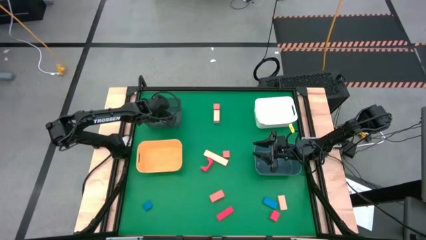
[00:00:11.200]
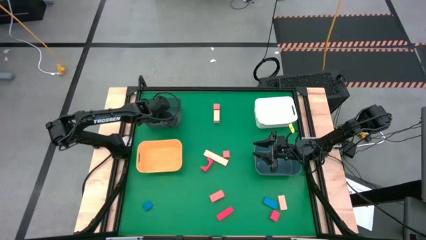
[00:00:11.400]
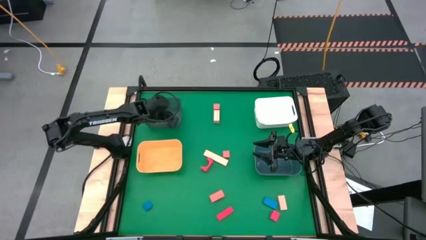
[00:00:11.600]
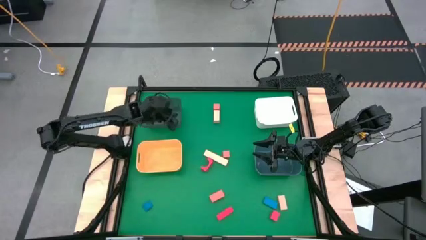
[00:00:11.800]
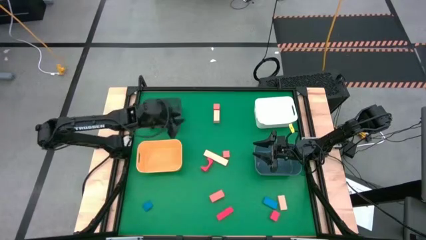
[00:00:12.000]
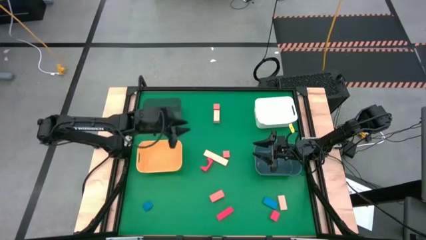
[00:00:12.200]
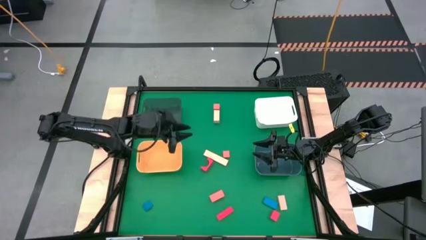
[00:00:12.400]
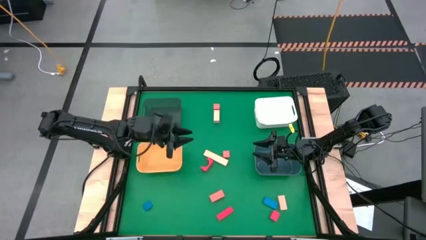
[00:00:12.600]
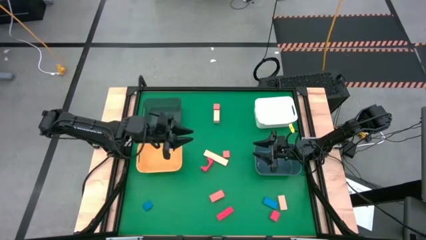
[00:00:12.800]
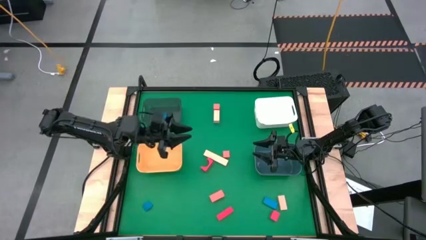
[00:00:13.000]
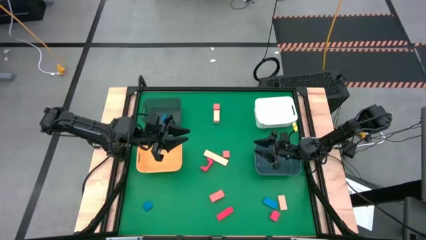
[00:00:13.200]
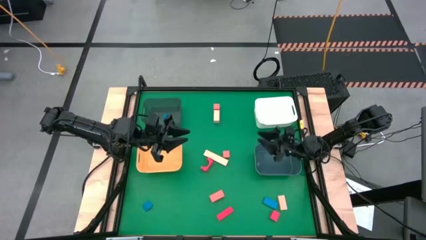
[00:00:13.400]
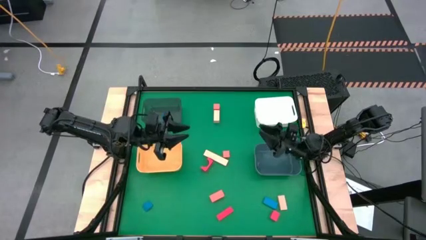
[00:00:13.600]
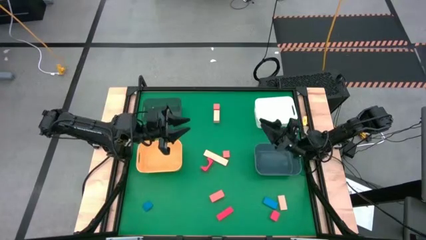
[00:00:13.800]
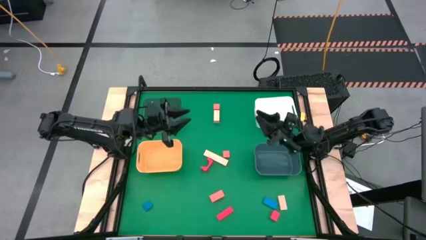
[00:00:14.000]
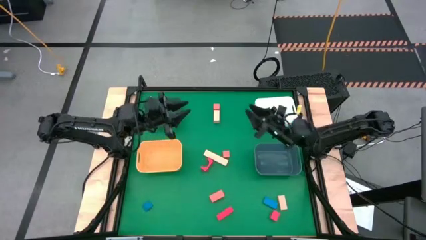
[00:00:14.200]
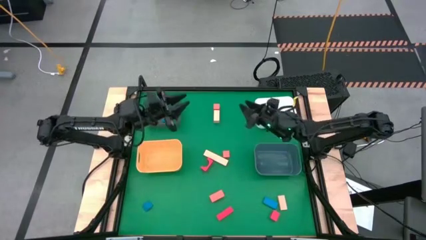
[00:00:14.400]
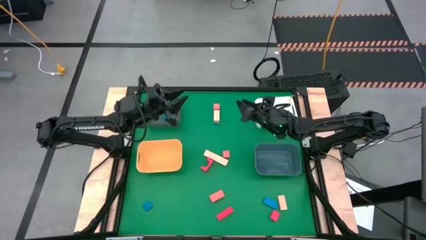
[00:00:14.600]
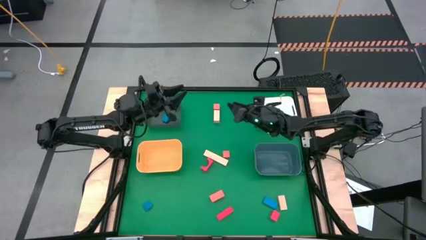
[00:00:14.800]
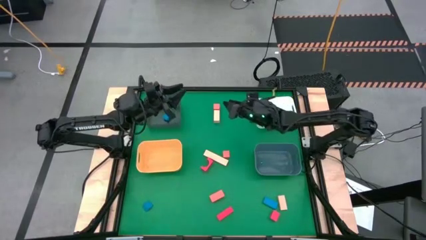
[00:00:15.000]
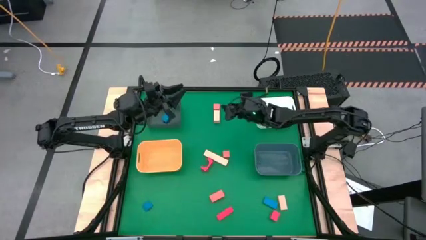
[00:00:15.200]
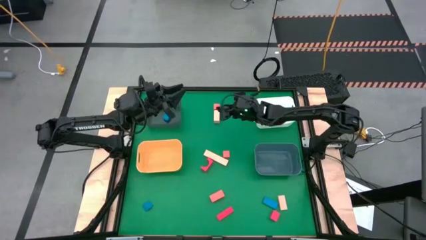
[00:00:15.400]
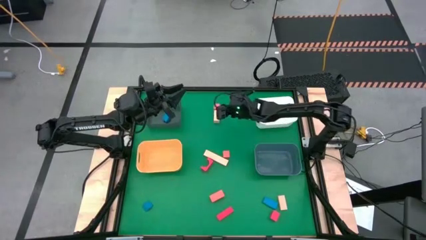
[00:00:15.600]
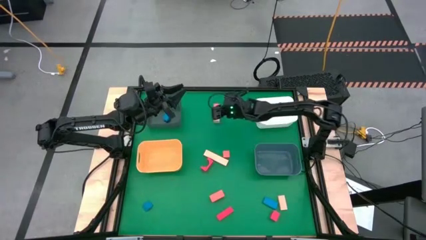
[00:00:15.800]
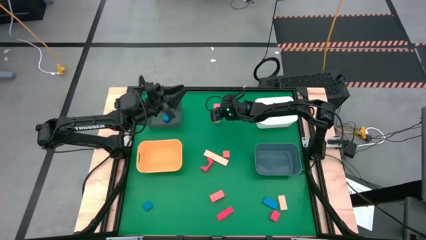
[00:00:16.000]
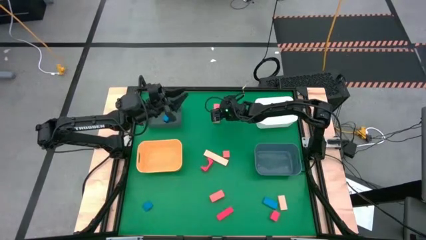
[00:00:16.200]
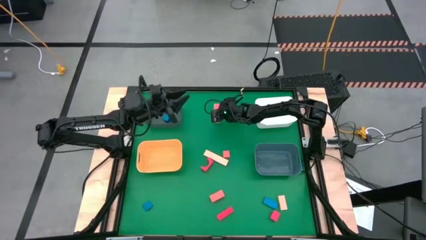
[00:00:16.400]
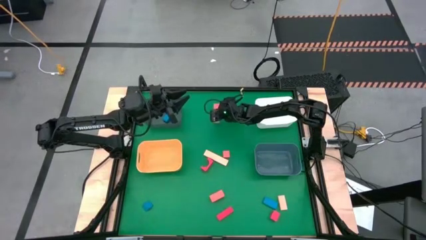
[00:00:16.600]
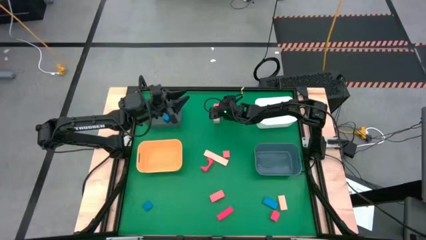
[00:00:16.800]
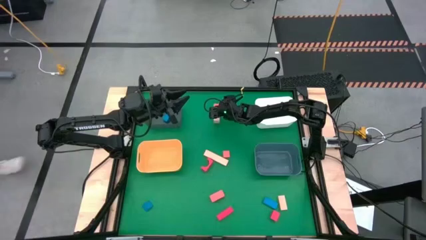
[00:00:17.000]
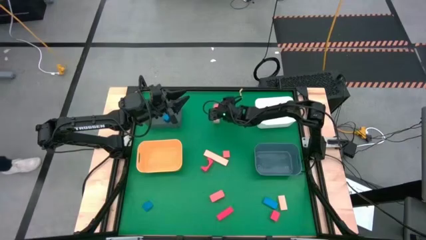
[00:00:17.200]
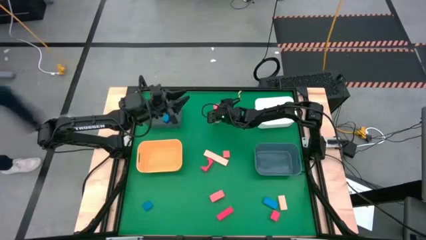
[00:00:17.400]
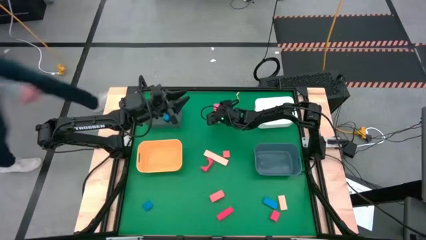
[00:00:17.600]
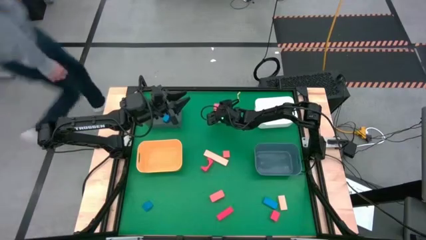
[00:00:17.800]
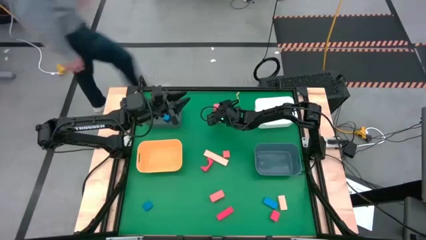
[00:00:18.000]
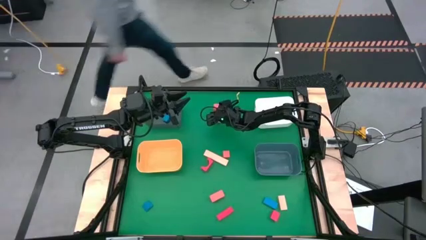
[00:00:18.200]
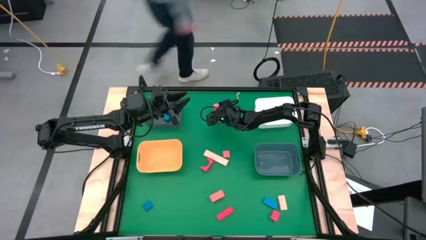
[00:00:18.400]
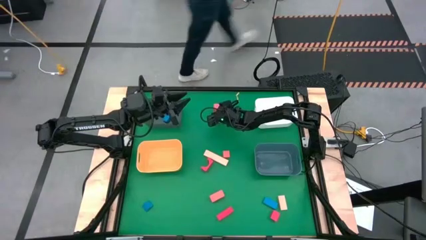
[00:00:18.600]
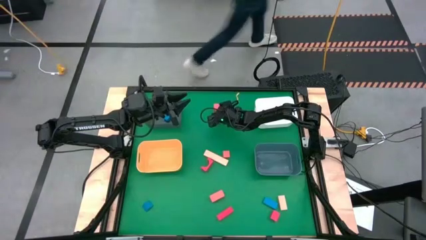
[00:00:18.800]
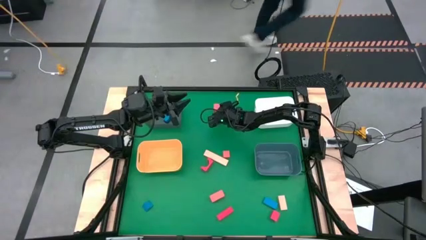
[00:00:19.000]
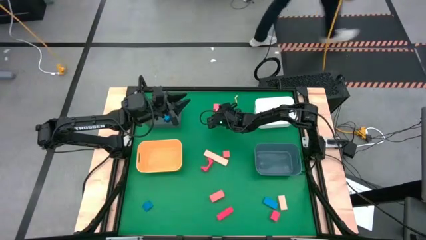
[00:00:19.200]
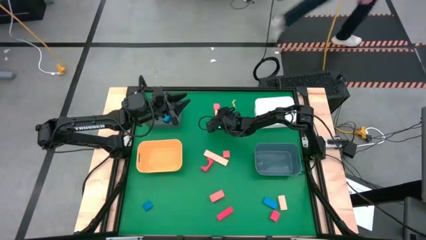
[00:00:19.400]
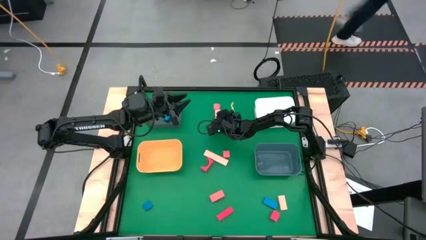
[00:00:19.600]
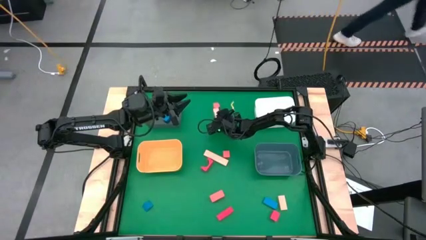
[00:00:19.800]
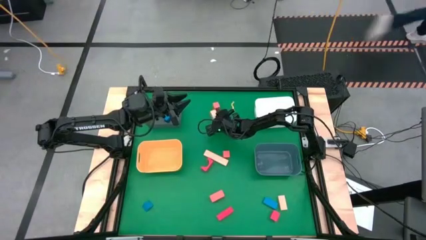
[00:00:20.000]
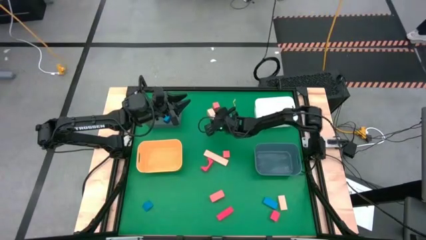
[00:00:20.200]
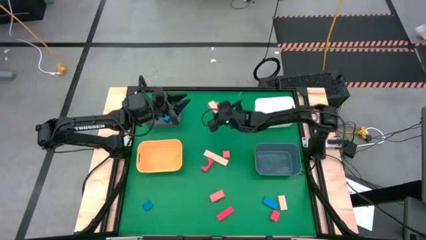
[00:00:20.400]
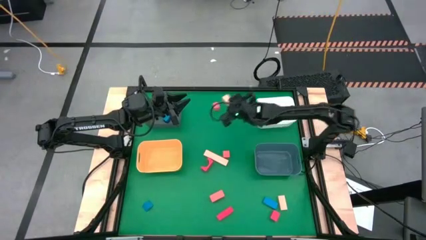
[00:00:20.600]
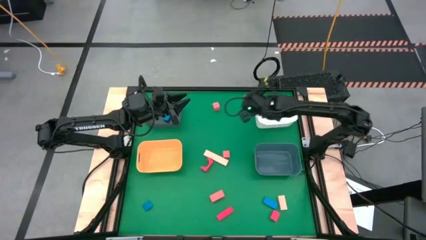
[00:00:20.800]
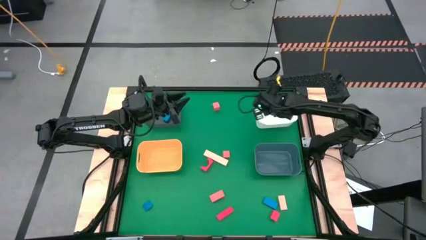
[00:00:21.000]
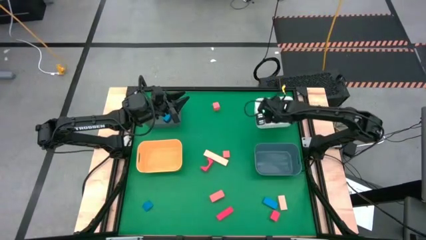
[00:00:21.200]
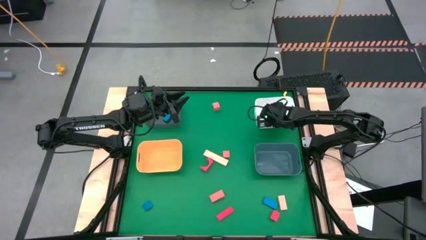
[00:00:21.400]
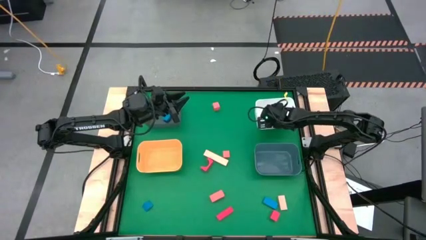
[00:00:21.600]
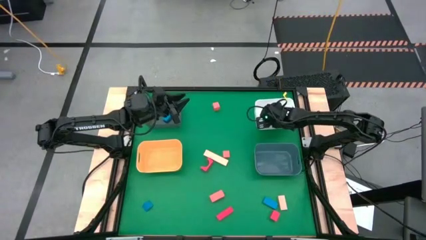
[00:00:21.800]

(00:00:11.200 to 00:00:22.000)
Task: Sort & place blocks by color
Put the top right light brown block into the white bin

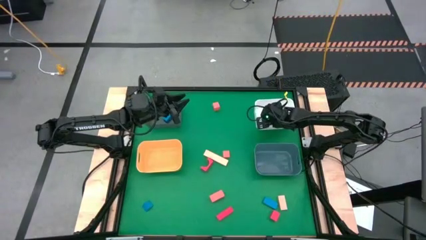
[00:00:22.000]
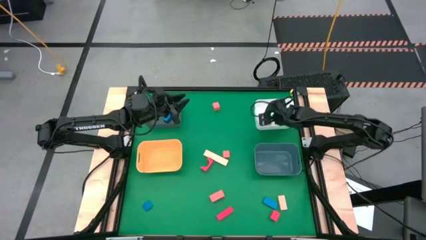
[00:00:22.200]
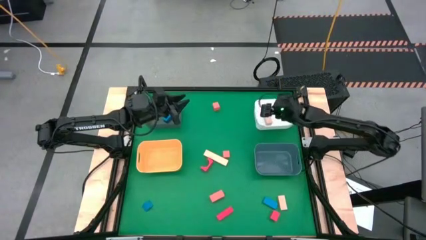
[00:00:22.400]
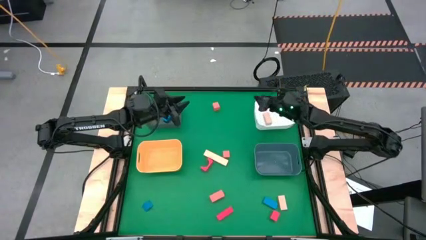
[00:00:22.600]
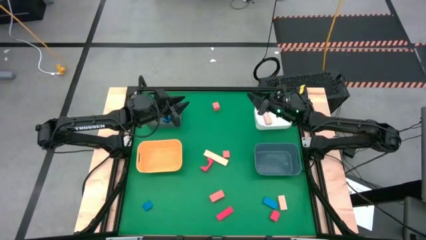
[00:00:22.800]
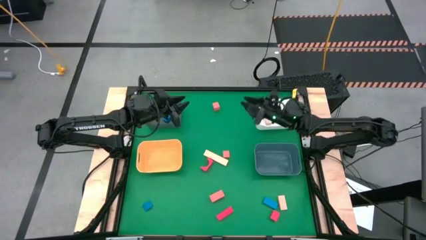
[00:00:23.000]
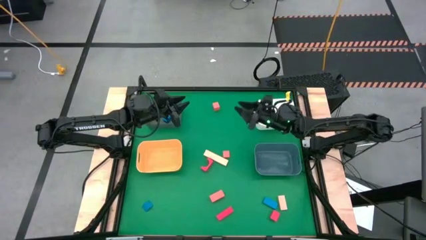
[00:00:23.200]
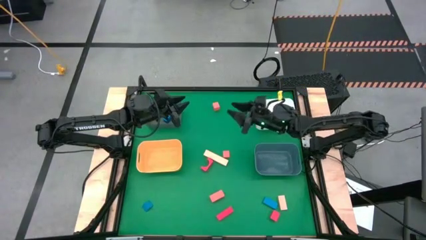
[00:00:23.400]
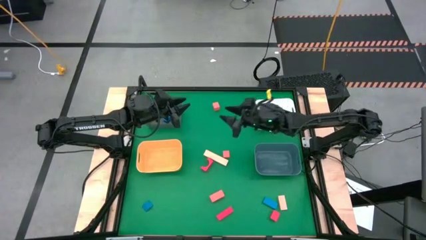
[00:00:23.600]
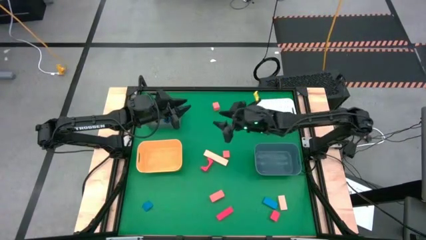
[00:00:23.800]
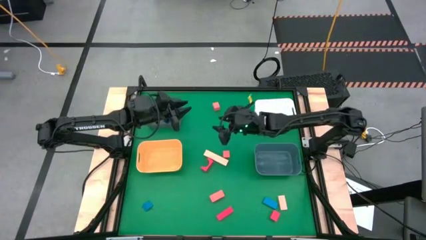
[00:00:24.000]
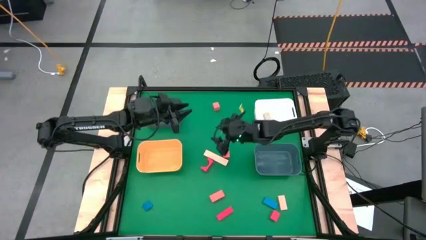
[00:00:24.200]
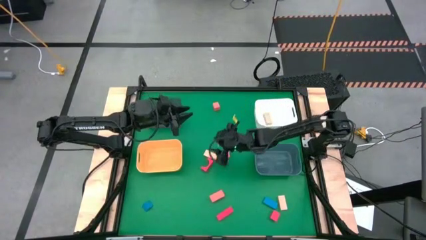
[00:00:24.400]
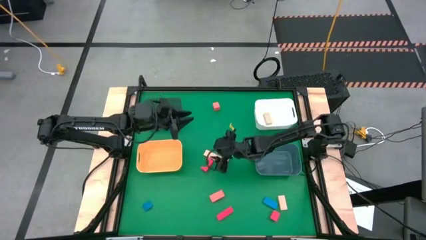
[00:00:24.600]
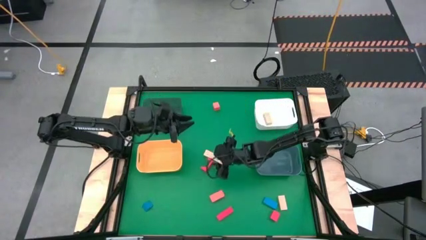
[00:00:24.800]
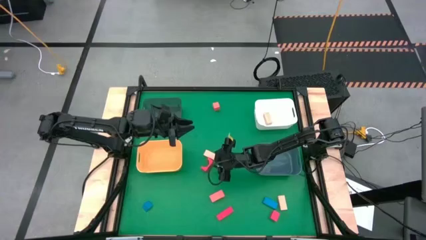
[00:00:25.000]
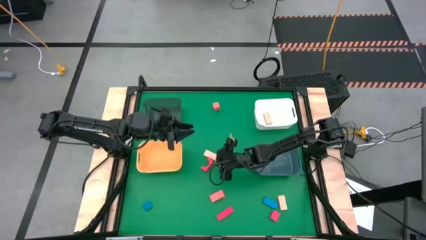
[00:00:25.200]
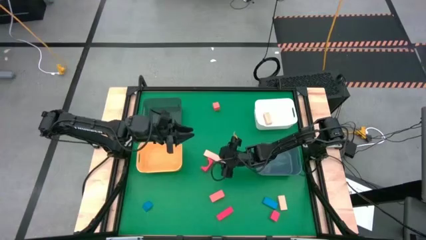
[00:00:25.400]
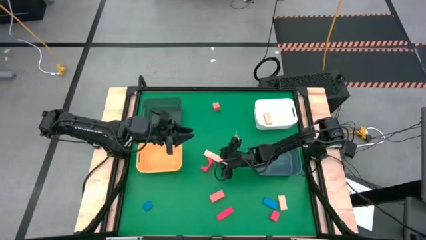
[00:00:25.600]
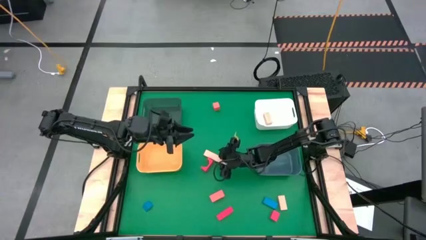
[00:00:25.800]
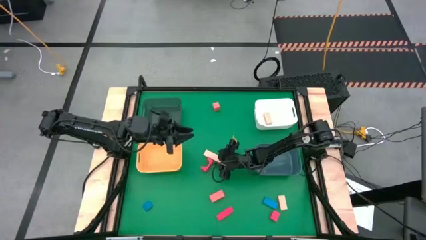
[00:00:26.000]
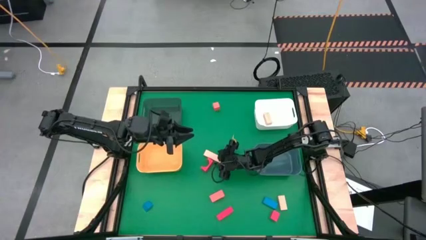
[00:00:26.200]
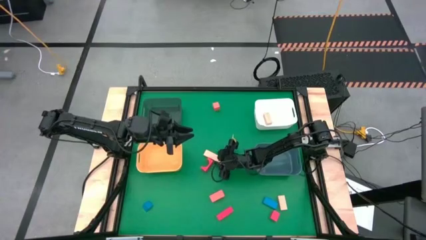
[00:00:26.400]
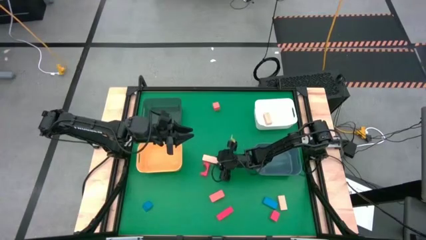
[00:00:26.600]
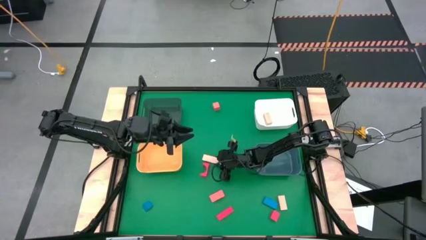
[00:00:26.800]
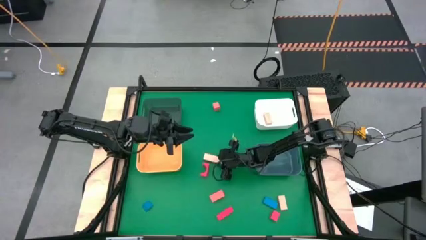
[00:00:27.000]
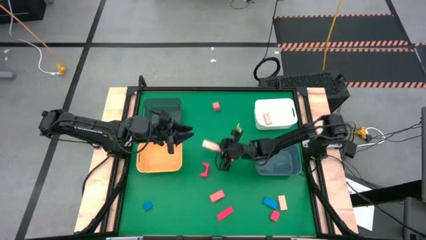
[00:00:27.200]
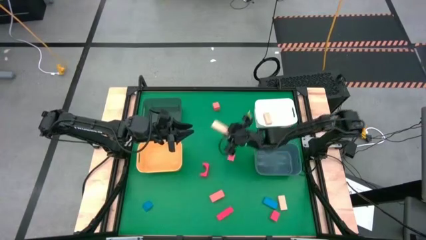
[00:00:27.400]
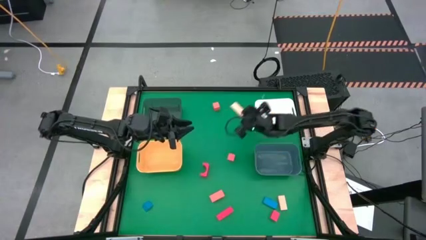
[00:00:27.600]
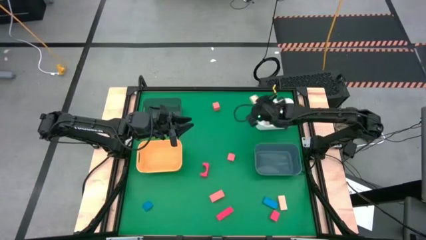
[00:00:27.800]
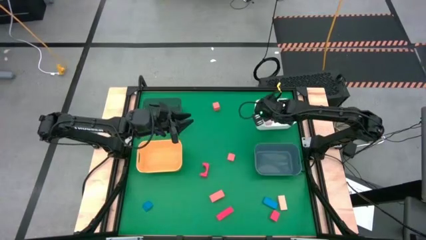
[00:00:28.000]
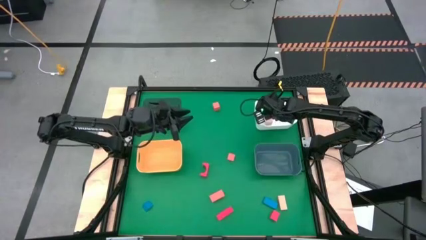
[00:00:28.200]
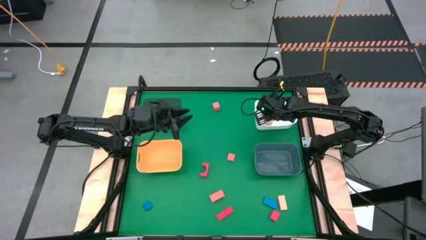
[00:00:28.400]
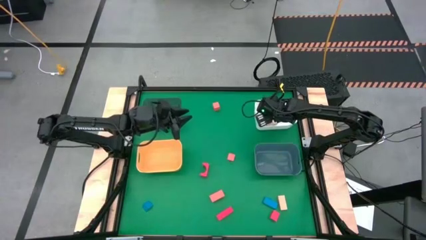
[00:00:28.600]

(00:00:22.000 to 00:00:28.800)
Put the top light brown block into the white bin
